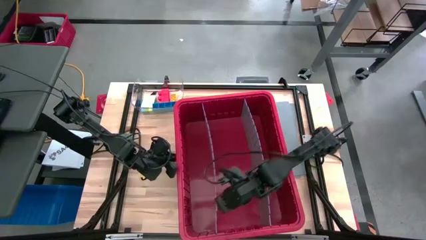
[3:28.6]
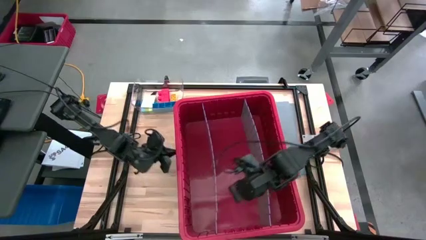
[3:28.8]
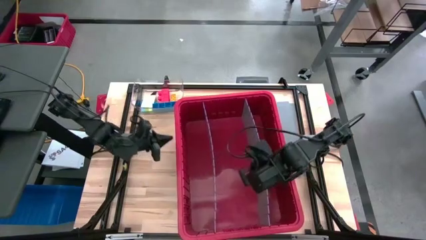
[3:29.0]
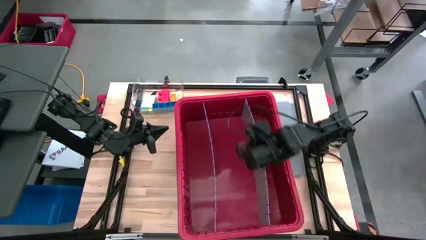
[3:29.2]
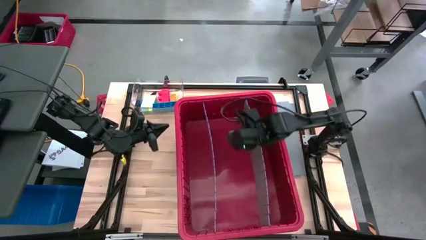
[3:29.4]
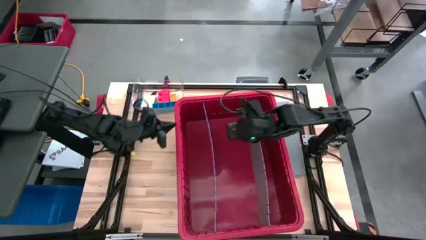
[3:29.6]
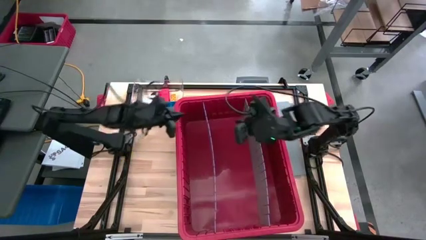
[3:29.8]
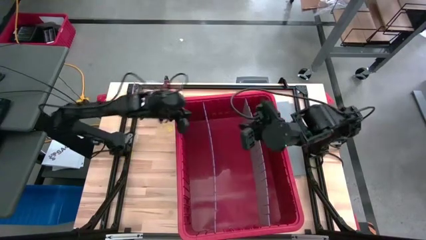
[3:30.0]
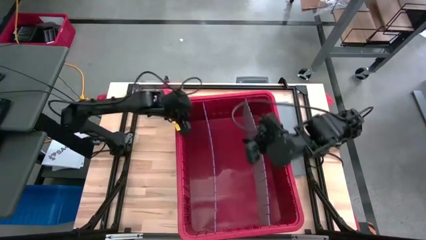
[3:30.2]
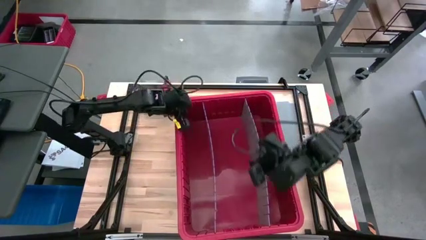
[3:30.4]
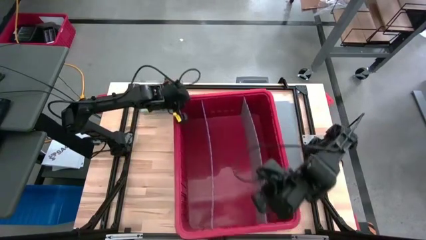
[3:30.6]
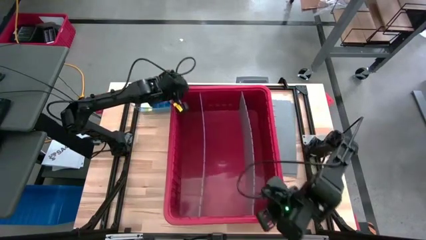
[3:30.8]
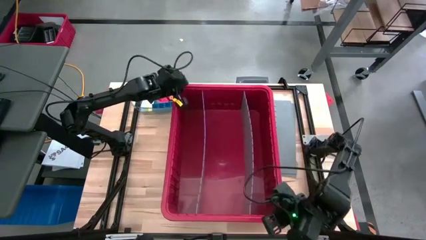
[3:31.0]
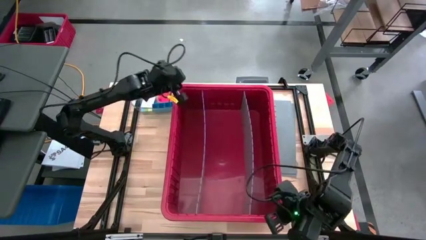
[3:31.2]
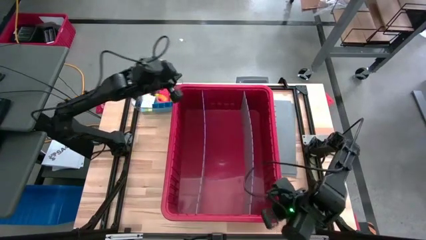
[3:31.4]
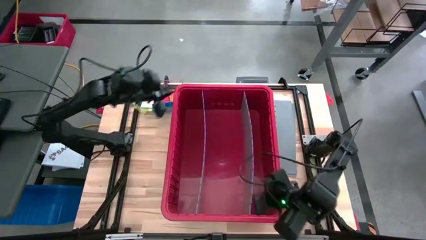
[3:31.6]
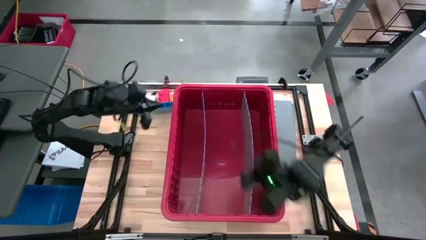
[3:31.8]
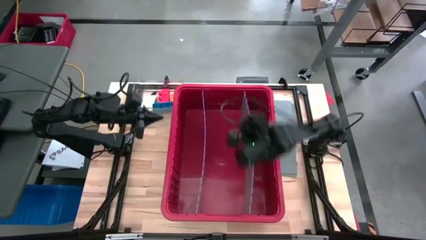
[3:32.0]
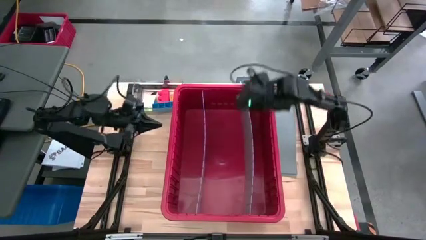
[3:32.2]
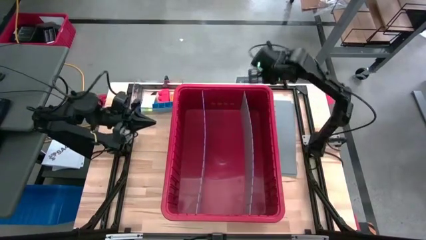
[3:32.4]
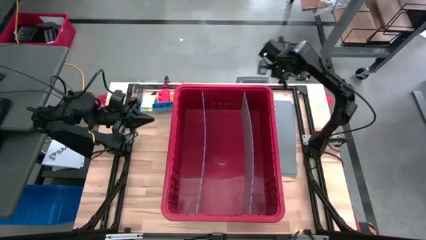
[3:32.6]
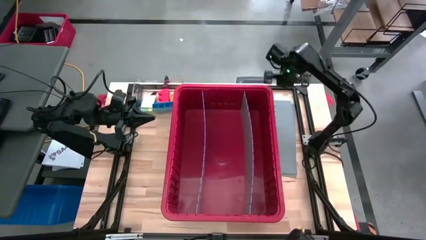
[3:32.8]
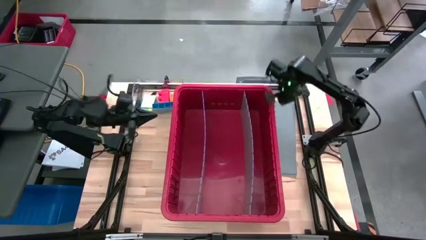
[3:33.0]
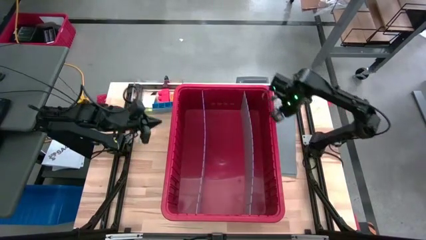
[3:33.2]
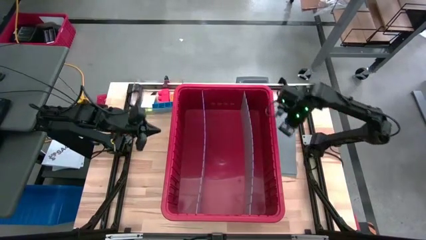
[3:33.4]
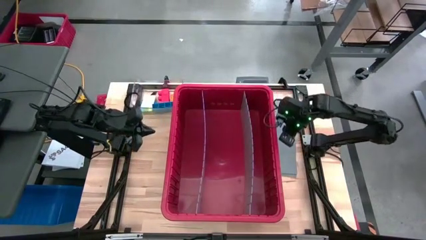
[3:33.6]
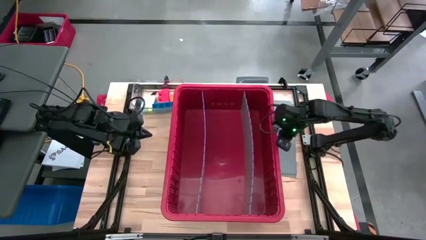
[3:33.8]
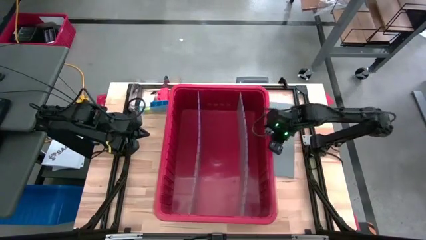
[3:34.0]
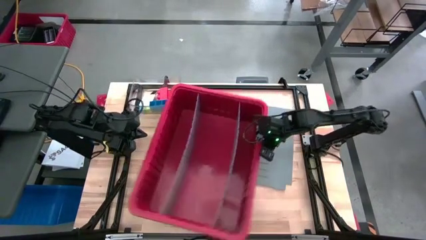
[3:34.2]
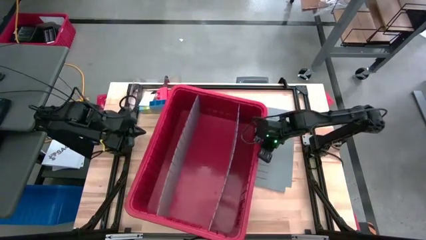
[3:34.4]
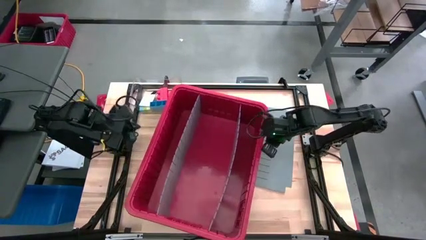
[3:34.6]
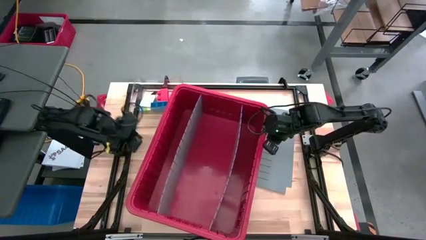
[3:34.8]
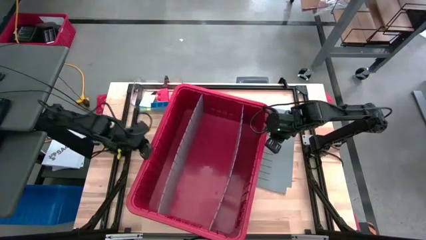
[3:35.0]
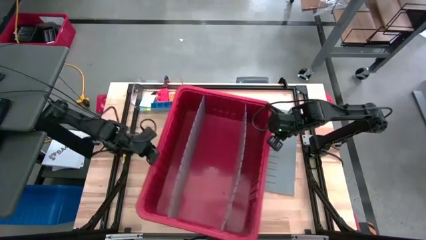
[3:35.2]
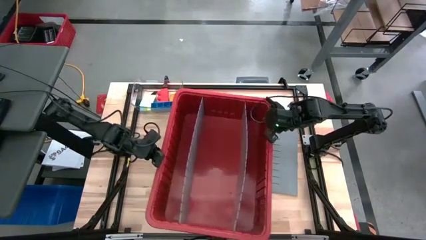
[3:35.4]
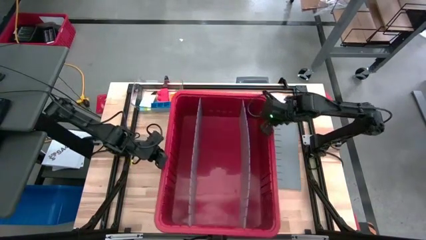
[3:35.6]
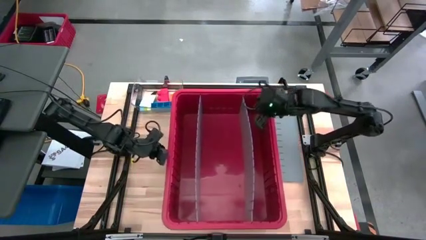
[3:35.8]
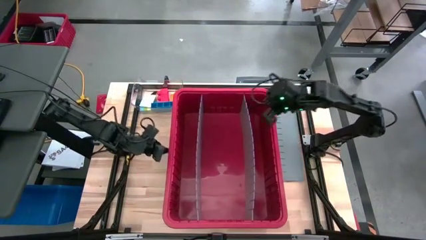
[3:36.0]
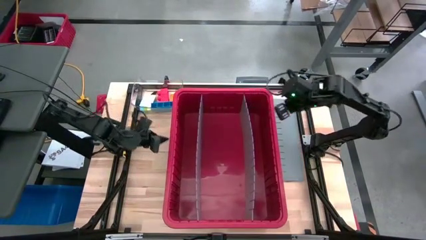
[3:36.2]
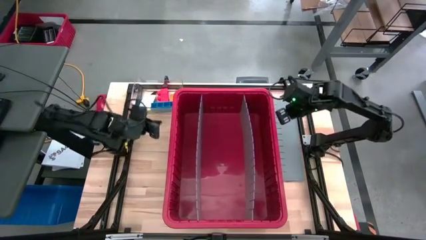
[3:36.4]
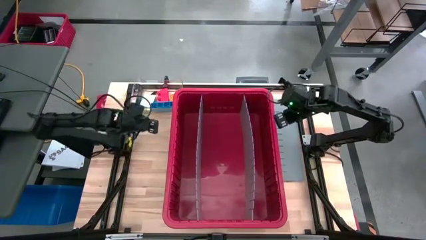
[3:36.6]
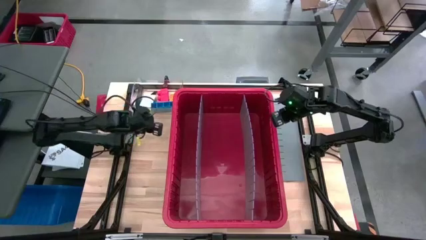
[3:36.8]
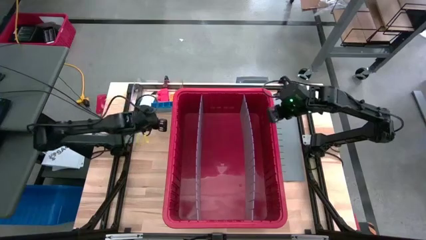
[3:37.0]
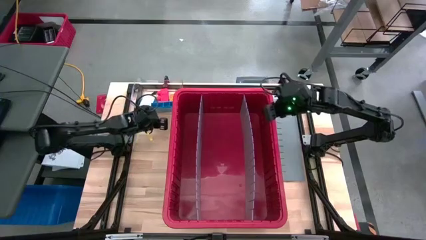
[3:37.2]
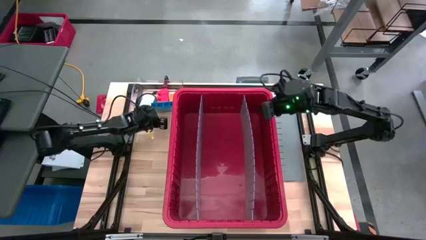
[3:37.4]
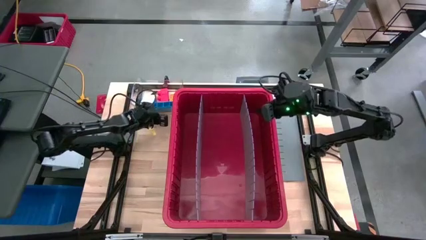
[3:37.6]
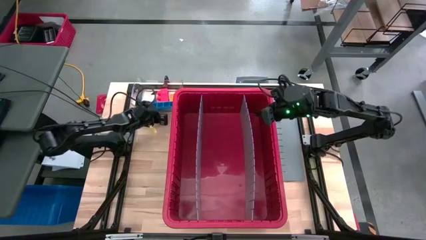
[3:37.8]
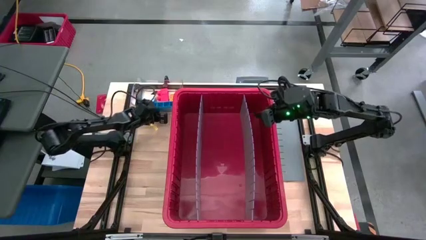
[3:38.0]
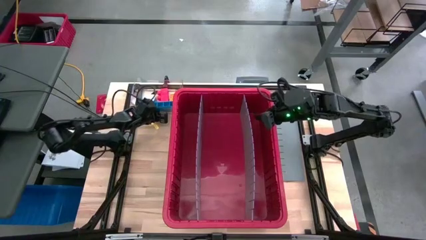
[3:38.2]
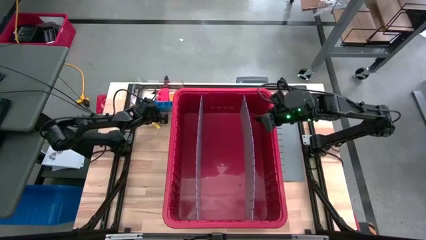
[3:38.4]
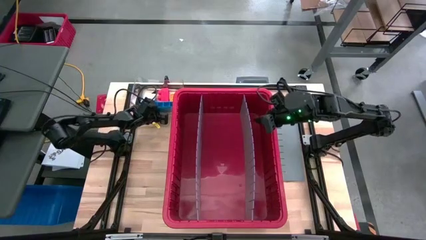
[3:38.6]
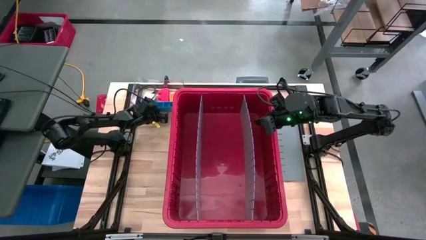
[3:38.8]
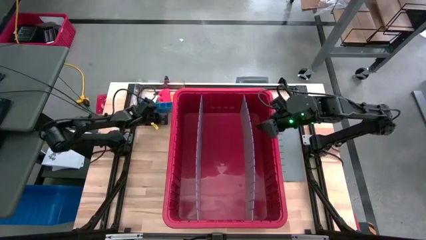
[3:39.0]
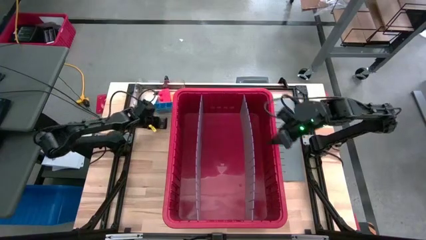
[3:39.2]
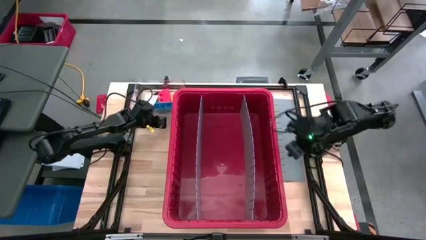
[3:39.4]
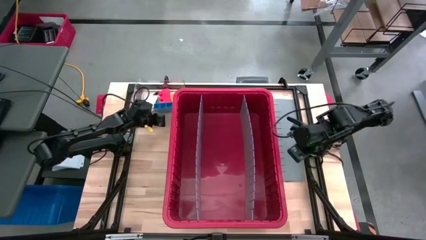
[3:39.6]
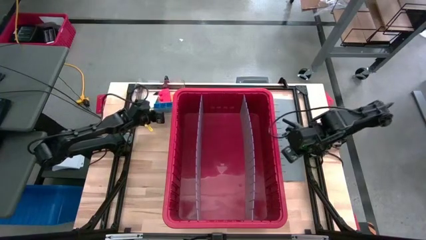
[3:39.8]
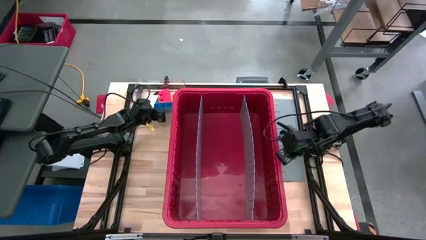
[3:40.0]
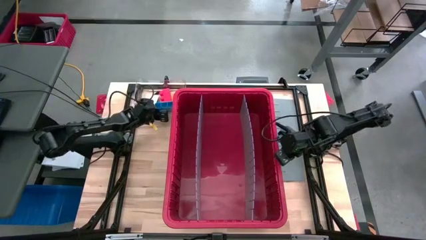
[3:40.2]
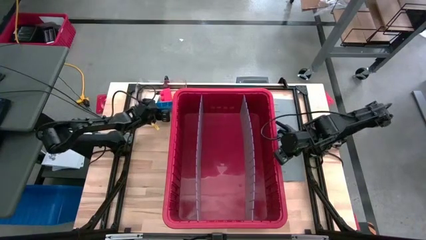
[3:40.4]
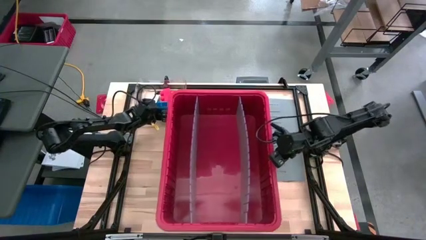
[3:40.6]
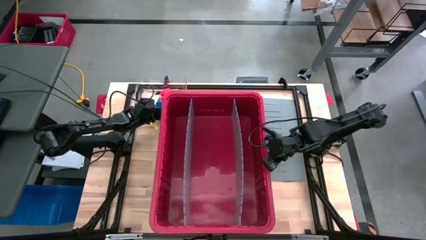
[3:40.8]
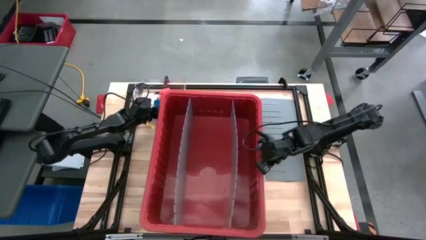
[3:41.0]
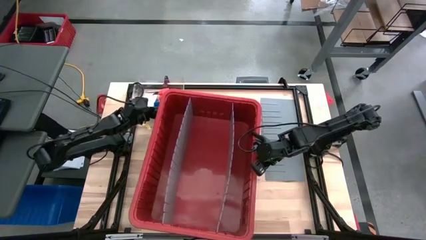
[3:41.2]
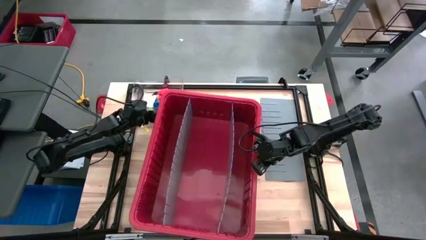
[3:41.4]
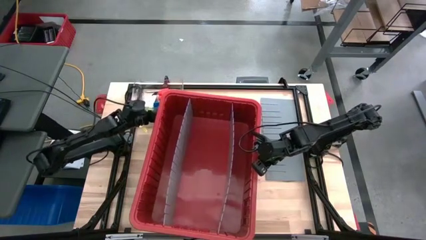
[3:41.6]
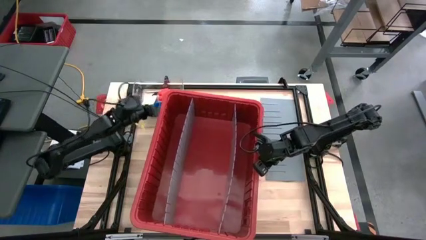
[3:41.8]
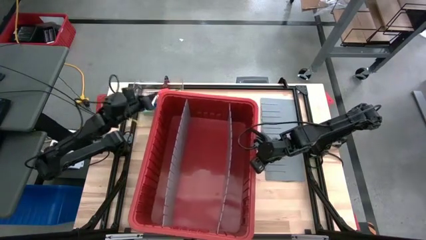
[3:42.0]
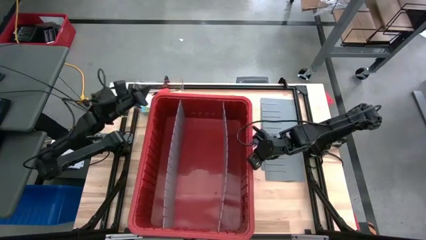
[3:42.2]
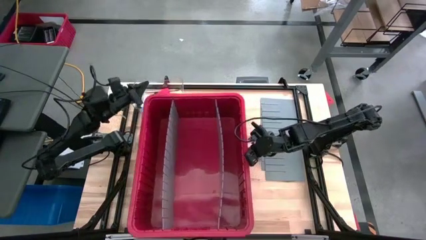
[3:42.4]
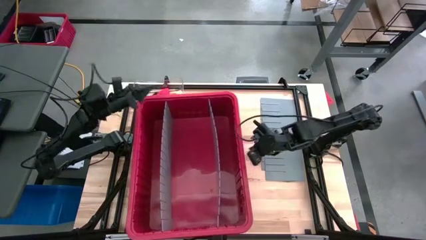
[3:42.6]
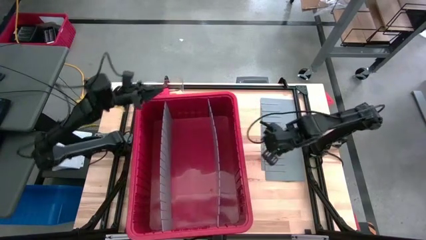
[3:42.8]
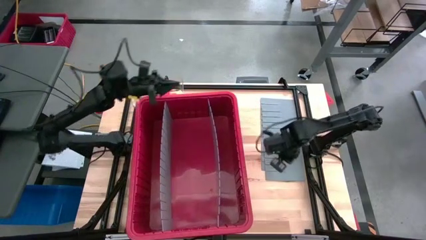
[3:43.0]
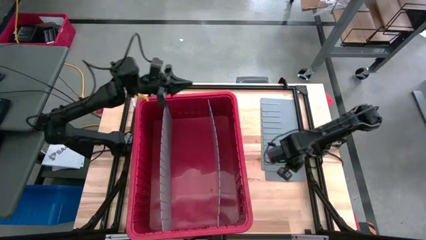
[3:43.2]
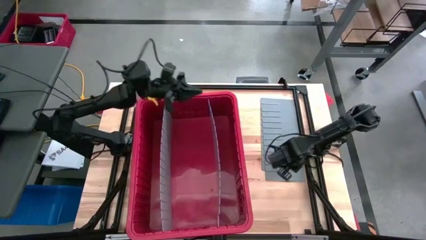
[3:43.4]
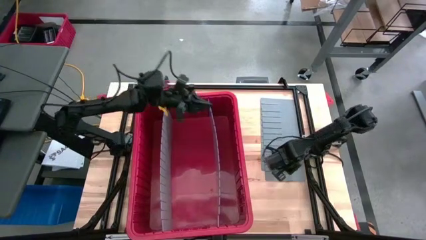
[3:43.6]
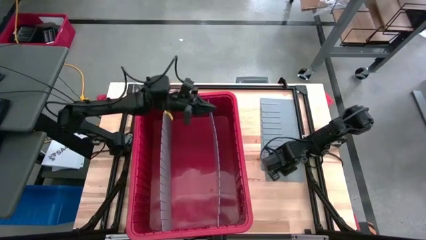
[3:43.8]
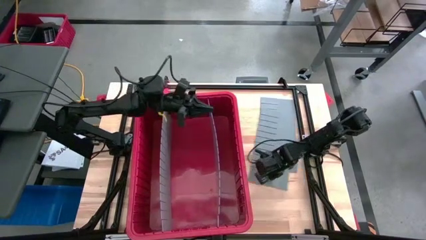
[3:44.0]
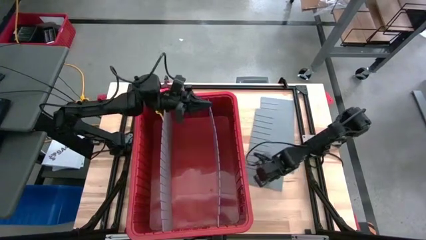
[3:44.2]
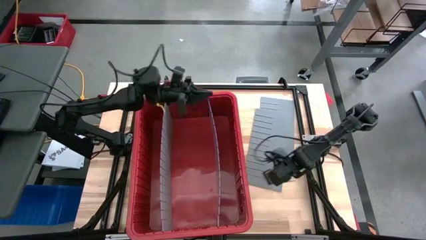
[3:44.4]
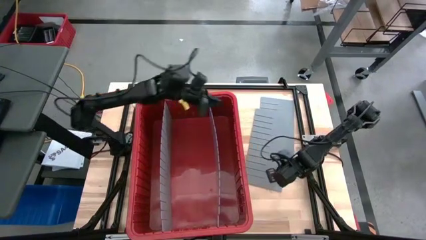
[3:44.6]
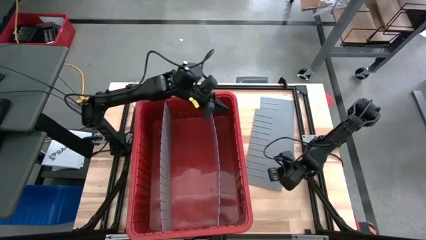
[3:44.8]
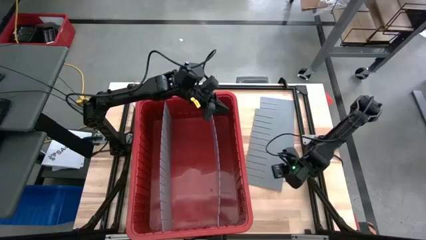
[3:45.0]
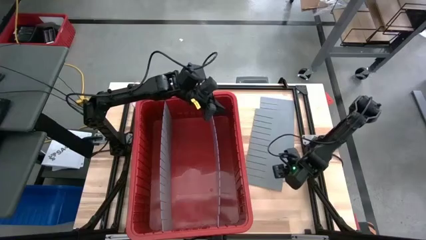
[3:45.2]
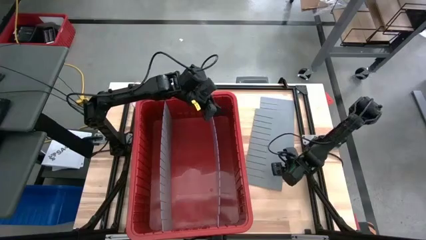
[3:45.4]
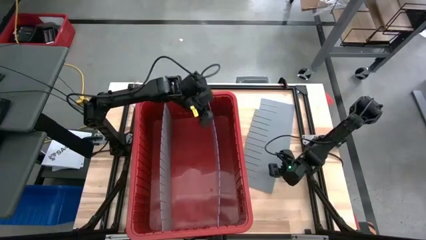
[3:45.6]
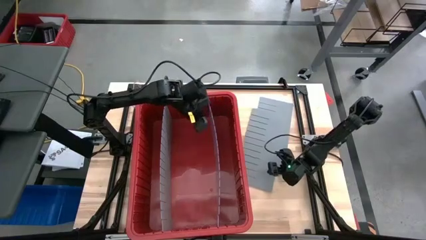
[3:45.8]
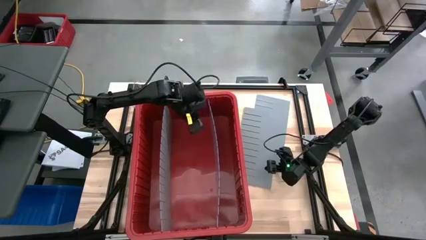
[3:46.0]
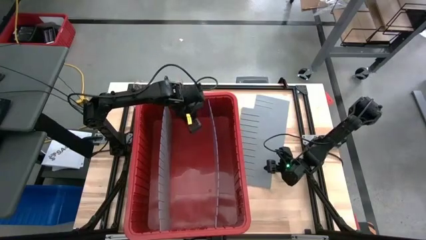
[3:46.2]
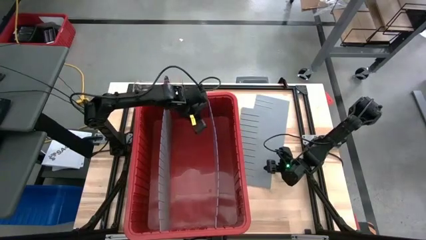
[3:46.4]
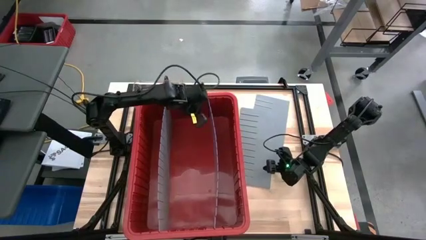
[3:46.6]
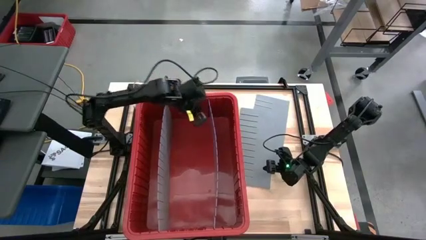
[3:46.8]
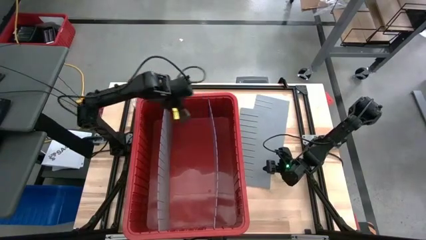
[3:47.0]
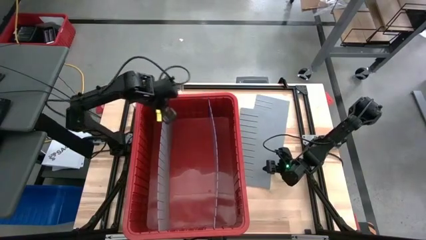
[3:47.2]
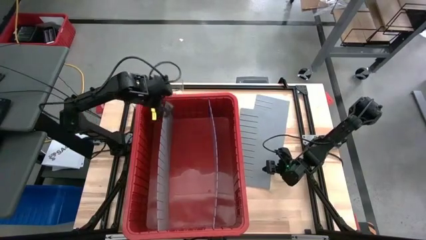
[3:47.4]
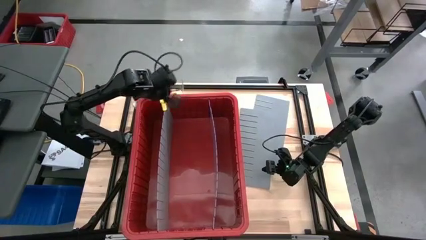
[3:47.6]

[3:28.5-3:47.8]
Task: Sort blocks
Assemble the bin divider into the red bin
